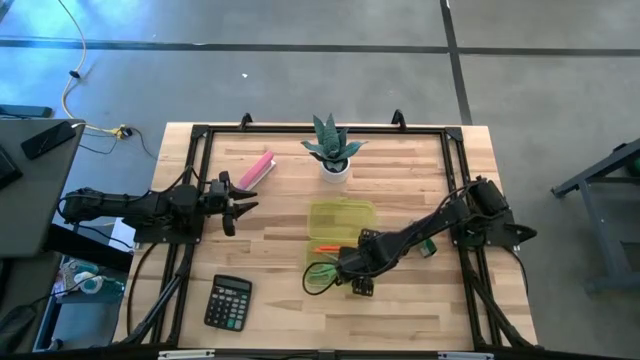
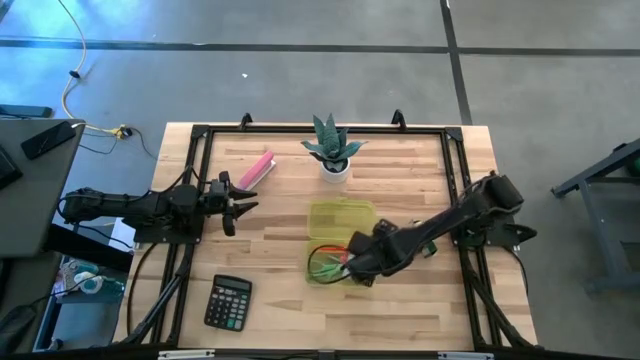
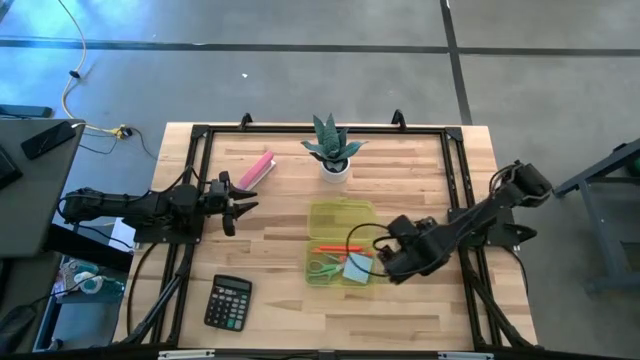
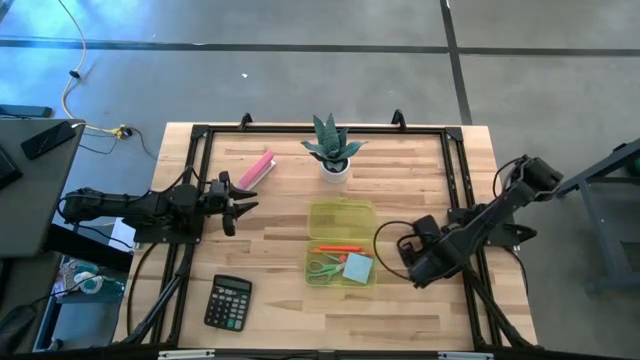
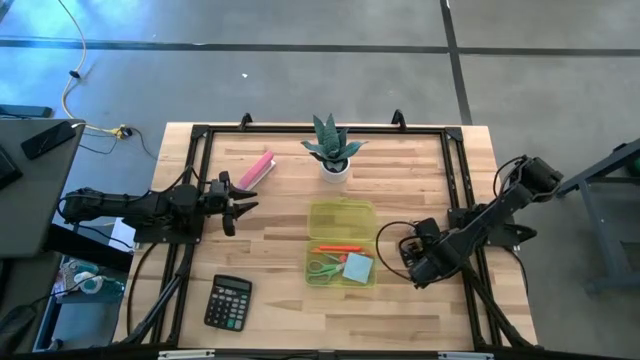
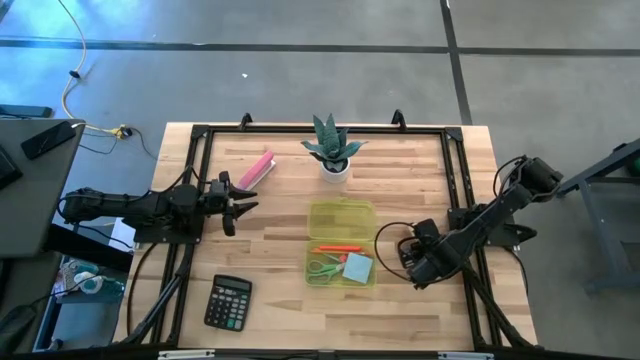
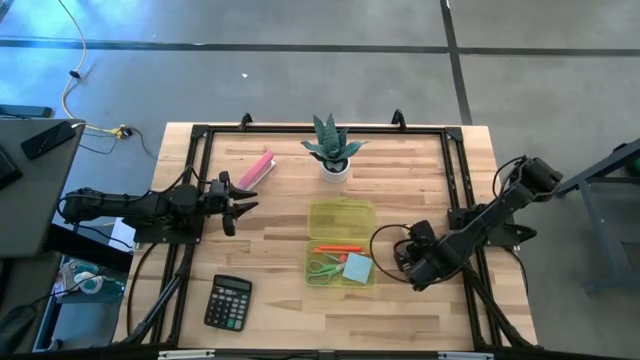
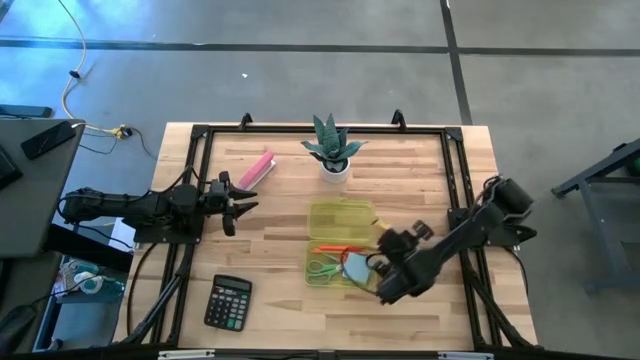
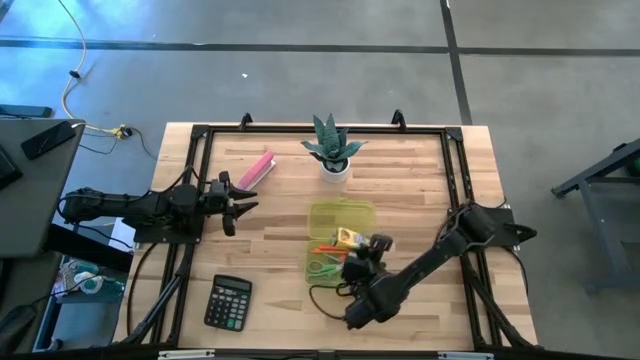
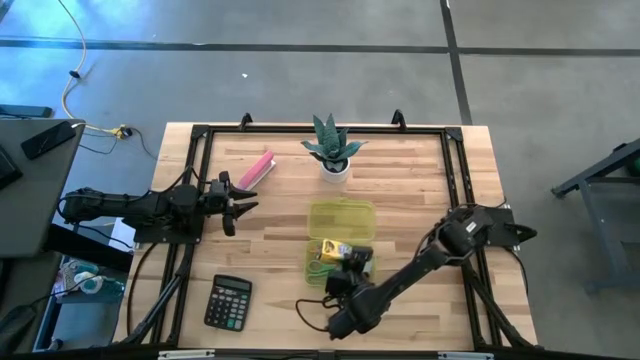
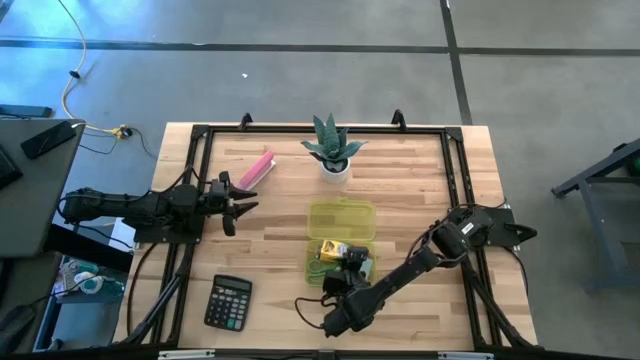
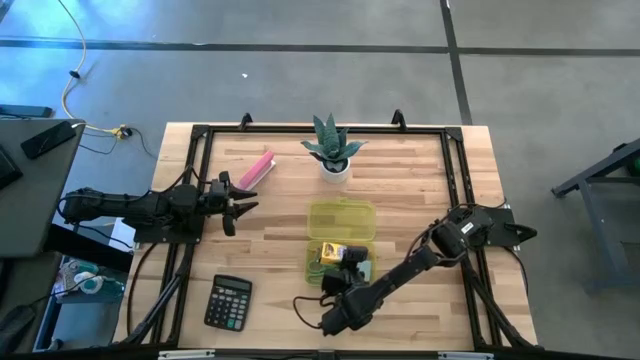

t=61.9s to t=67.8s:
Task: Pack school essentials
Put the box of crayons into the supply box

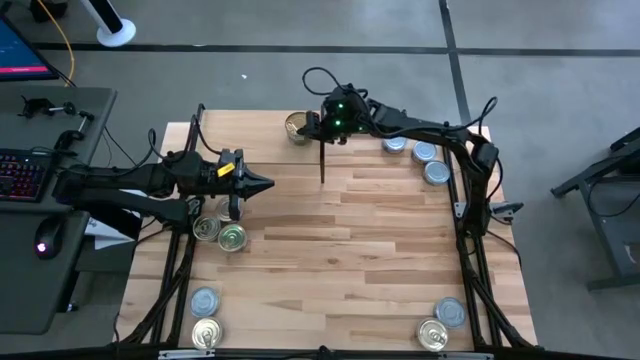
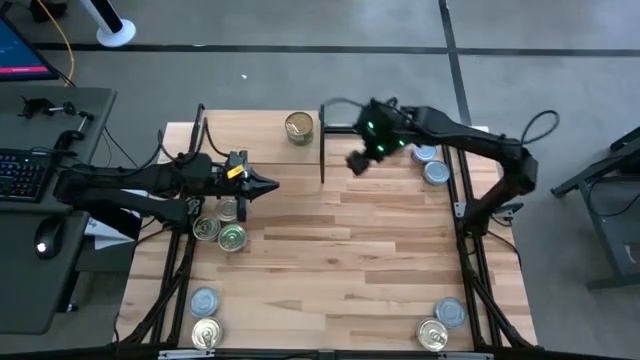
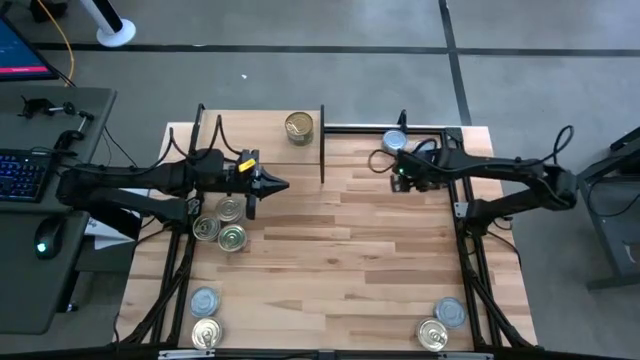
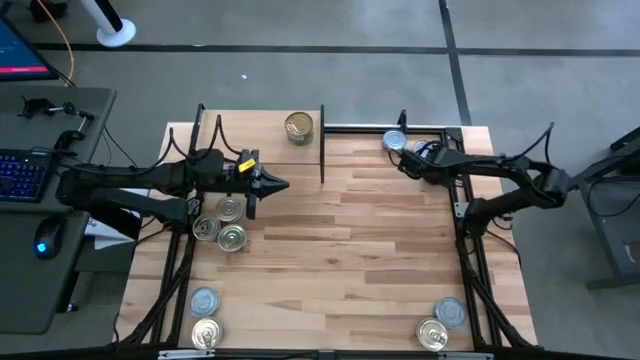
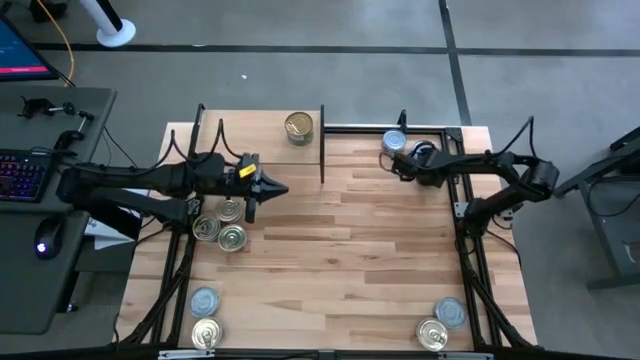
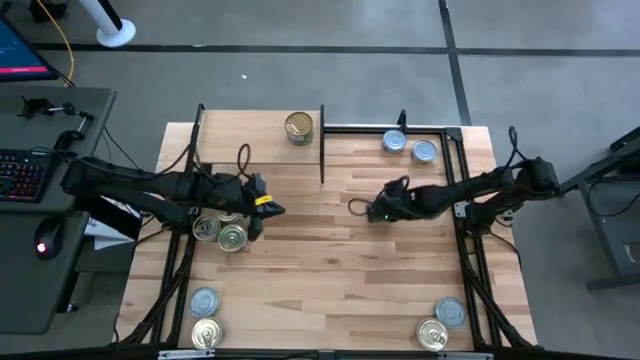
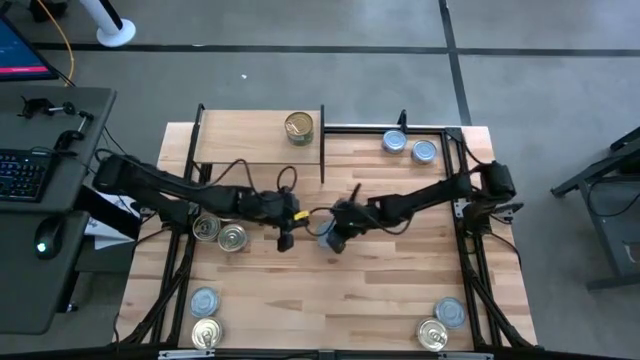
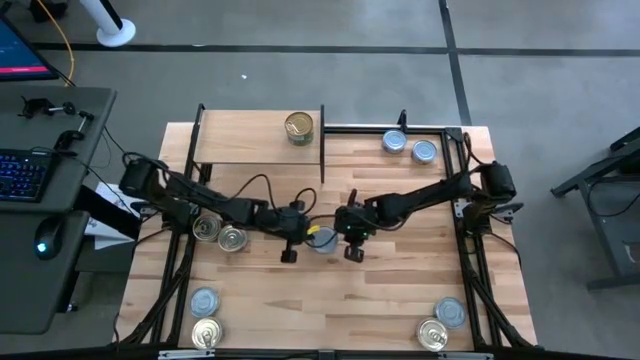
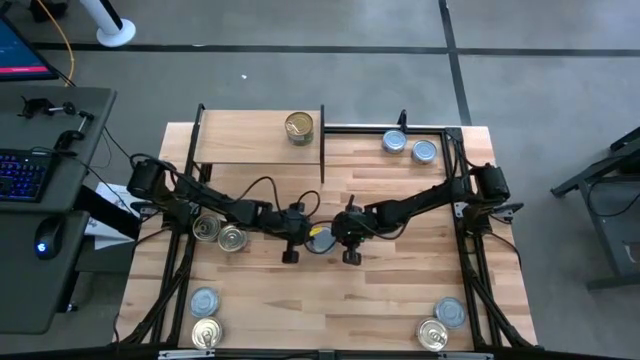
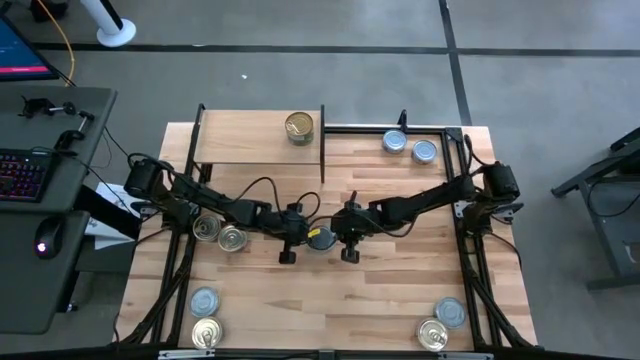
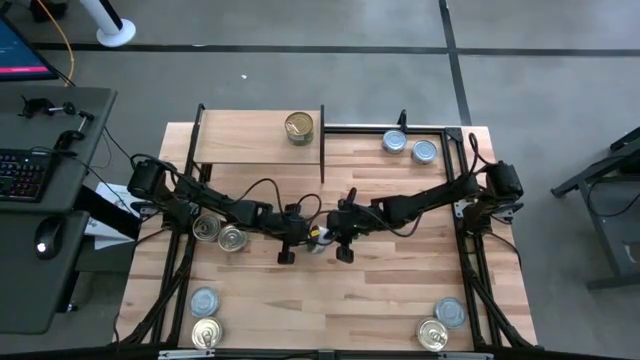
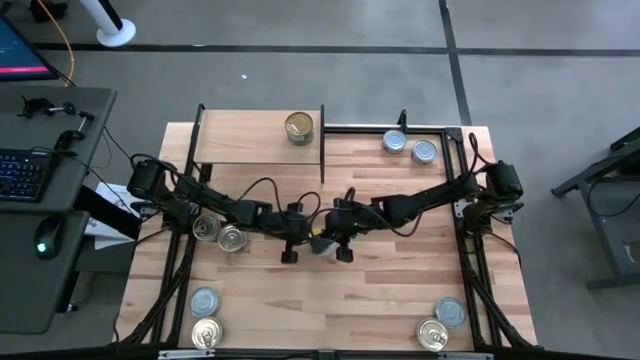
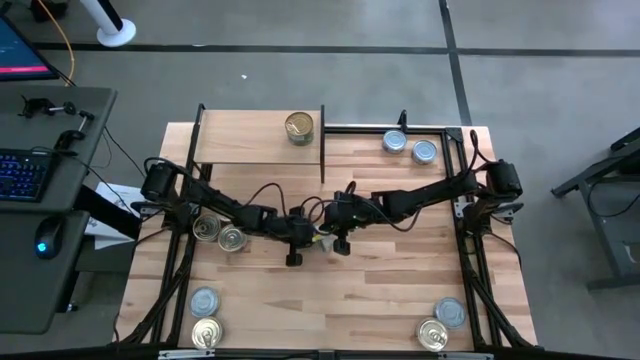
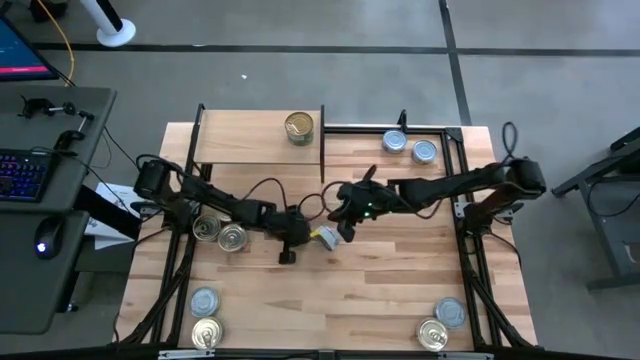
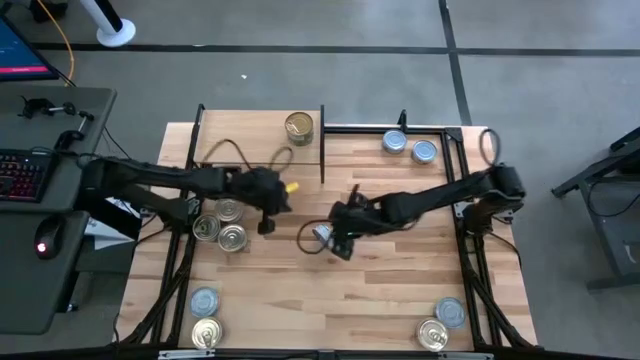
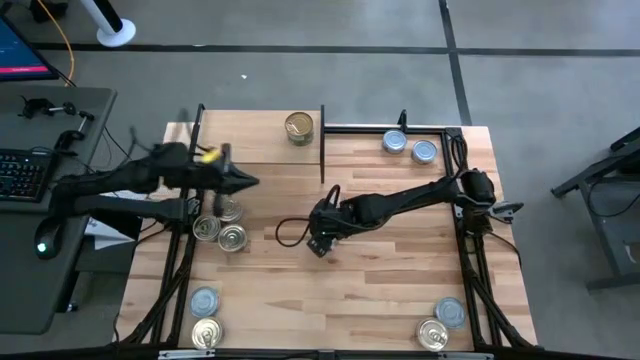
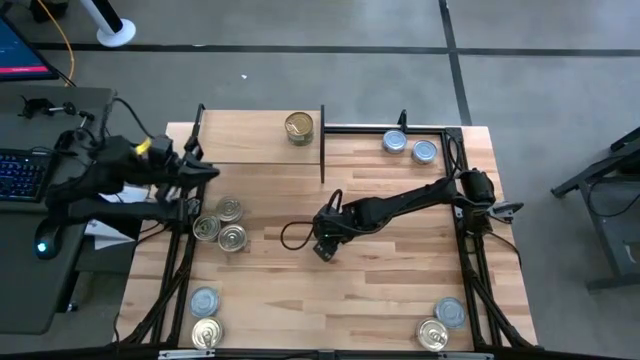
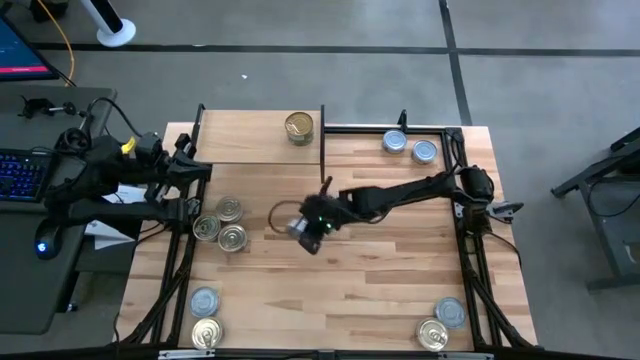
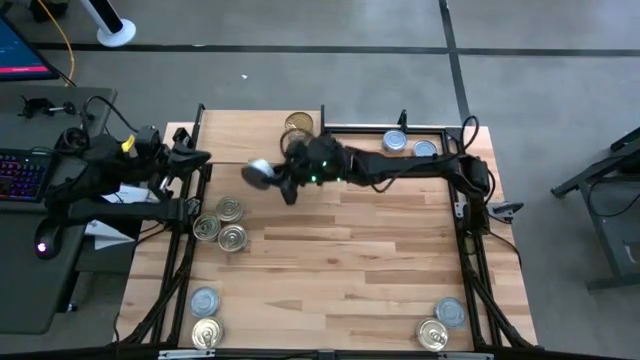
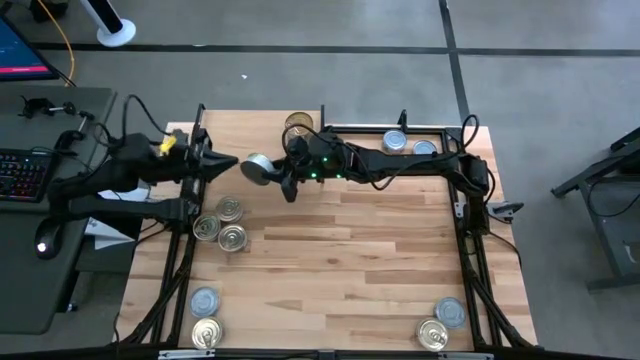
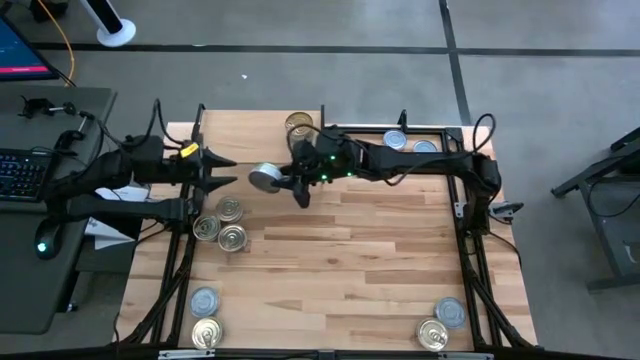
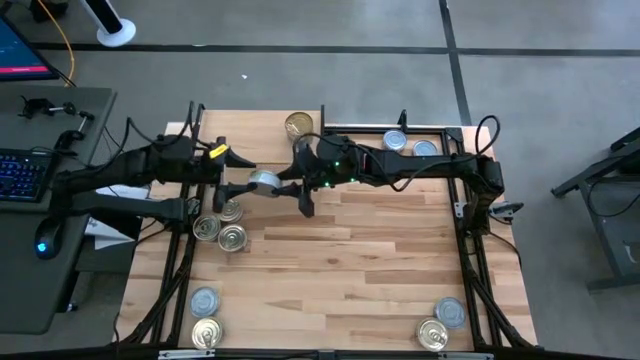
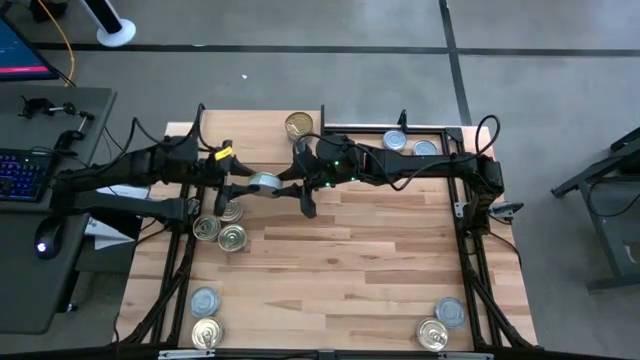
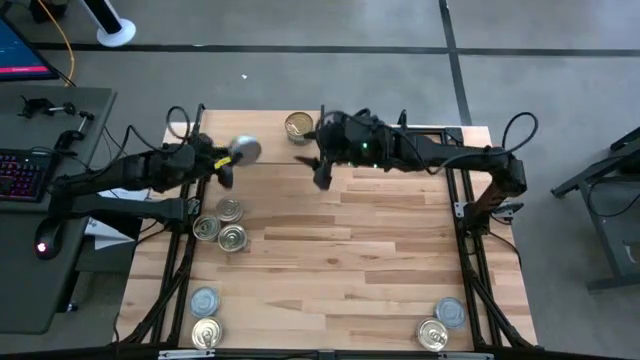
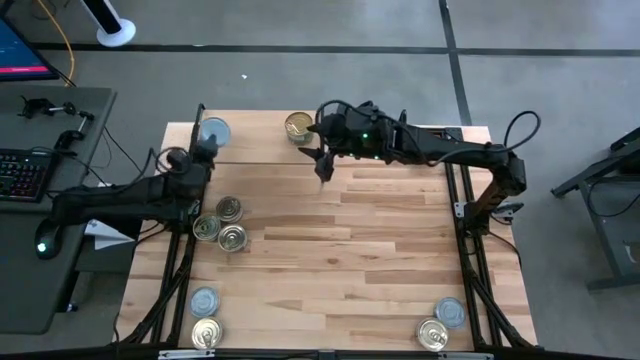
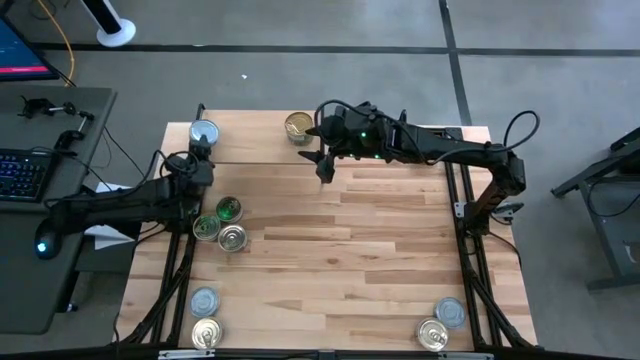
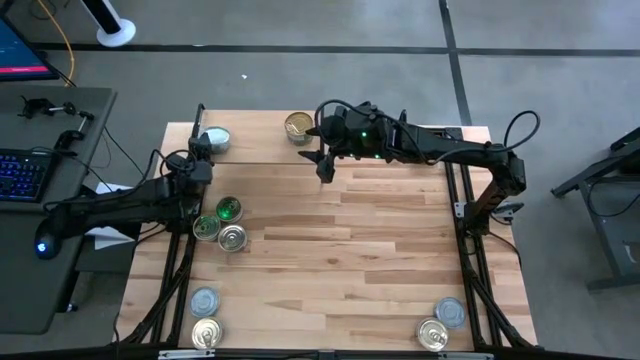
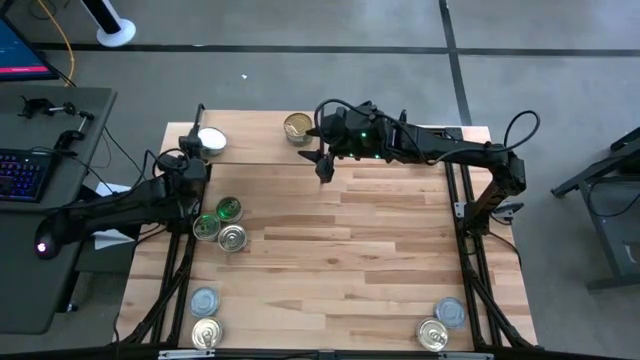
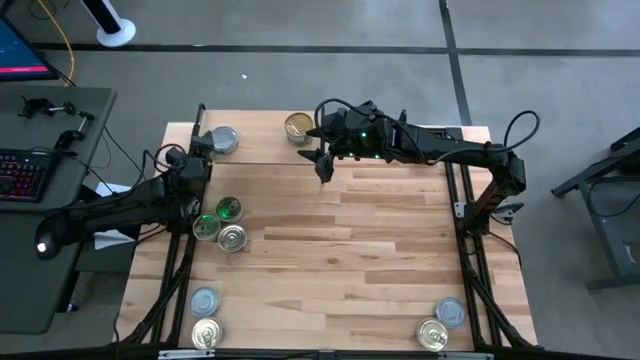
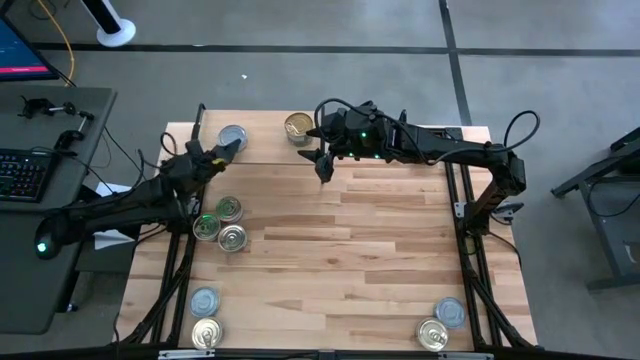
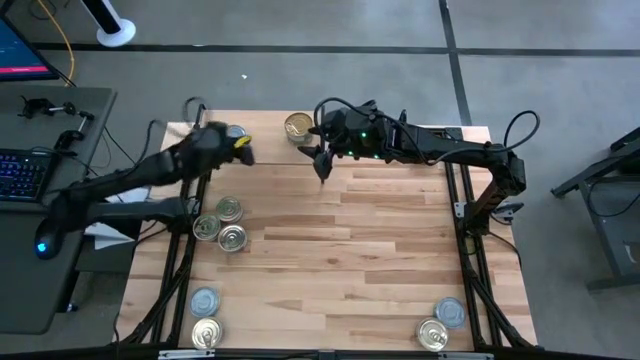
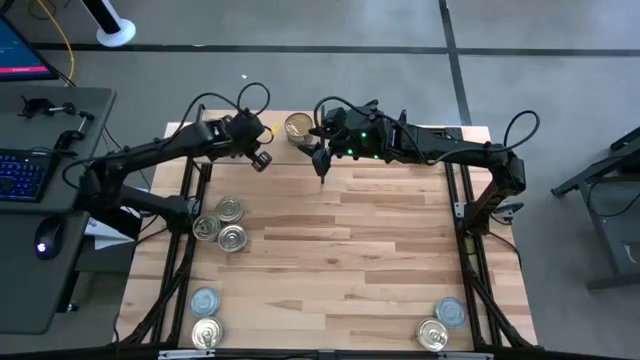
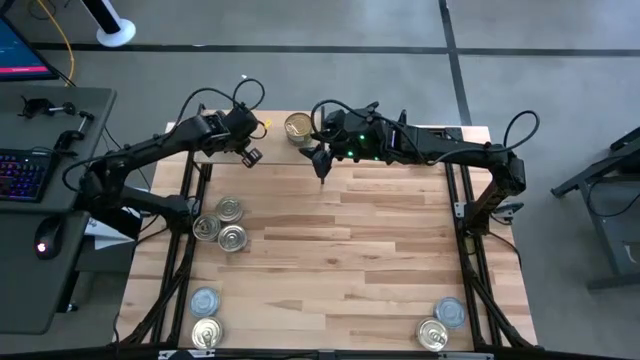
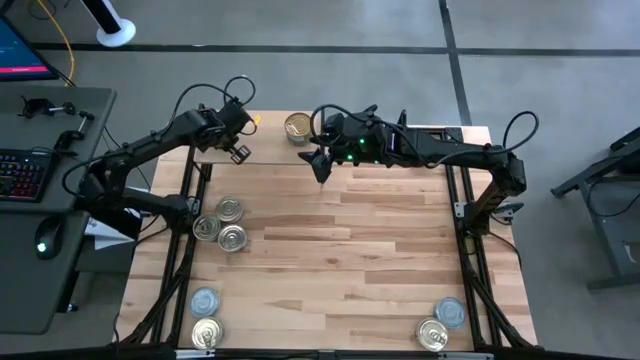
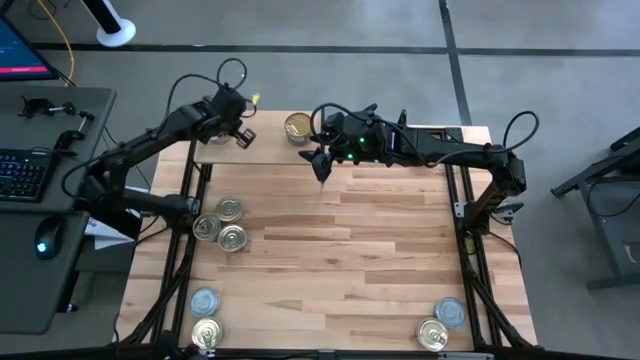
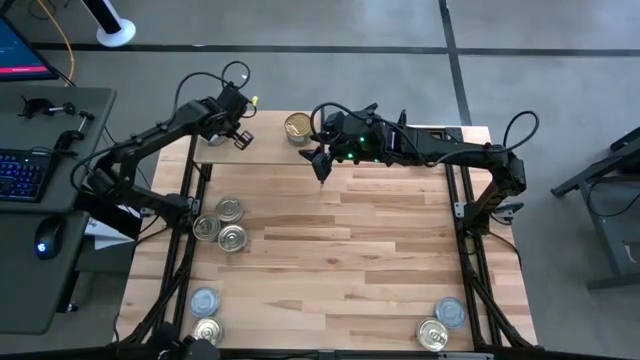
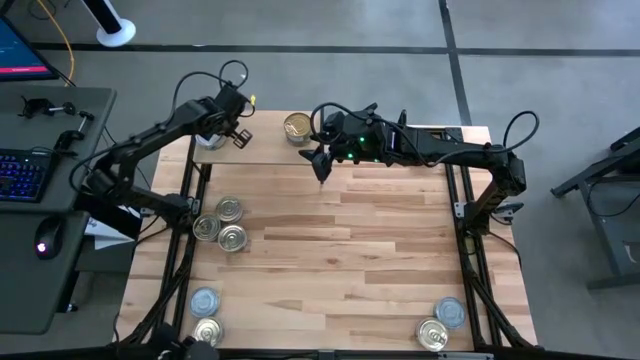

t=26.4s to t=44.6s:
Task: Stack canned seafood by type on shelf
Put the green-white tuna can on the shelf
